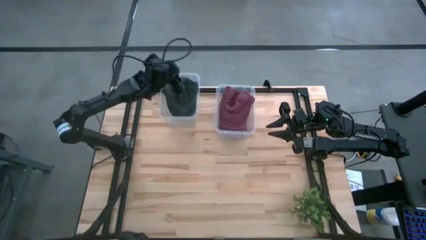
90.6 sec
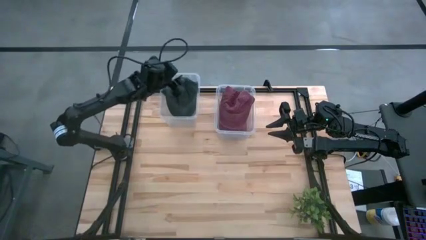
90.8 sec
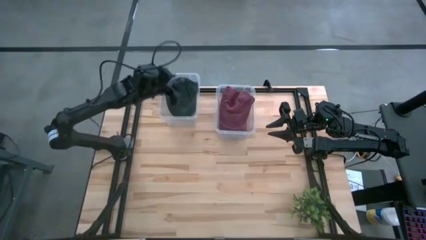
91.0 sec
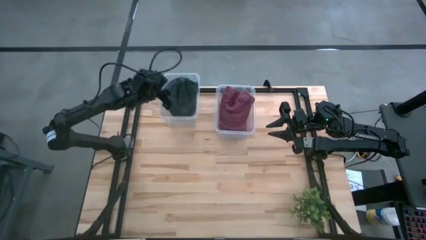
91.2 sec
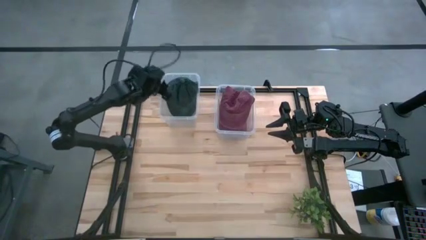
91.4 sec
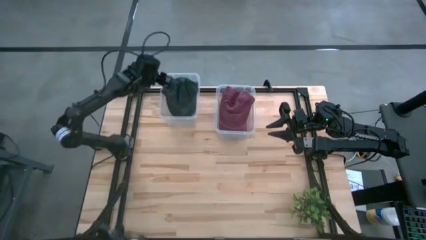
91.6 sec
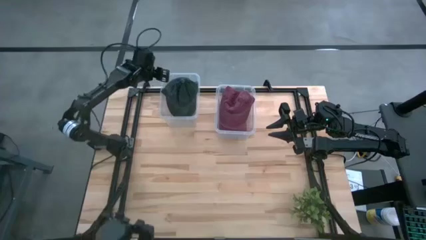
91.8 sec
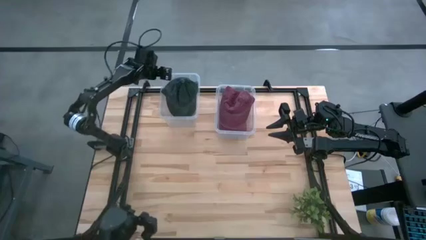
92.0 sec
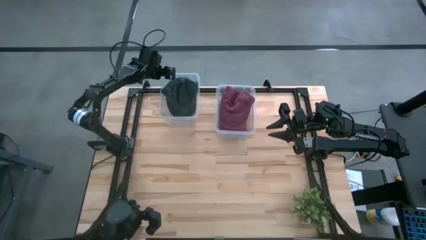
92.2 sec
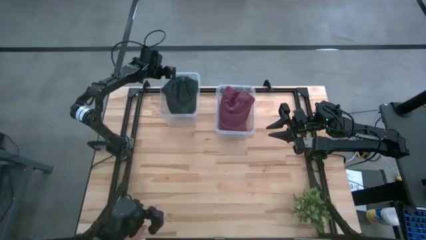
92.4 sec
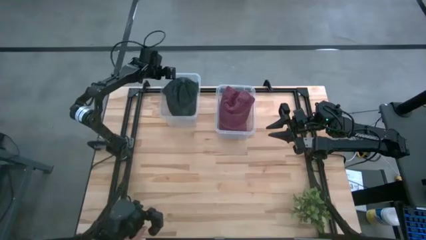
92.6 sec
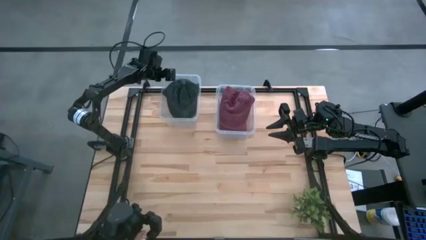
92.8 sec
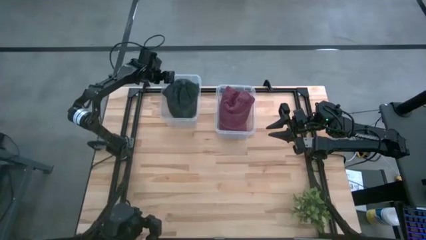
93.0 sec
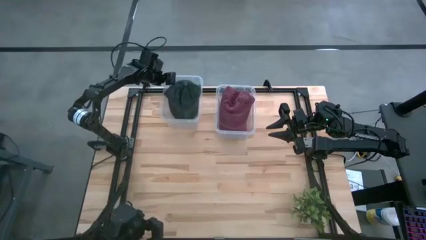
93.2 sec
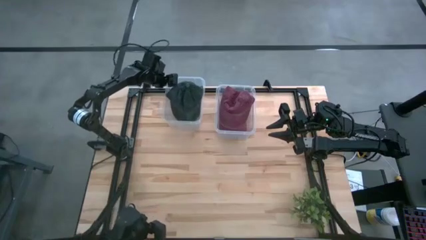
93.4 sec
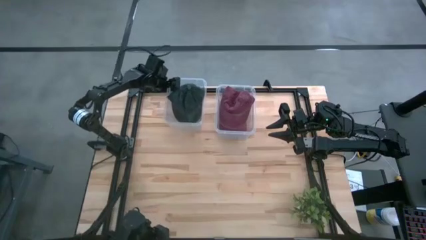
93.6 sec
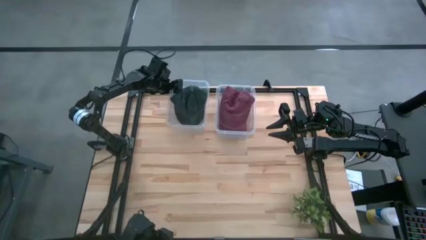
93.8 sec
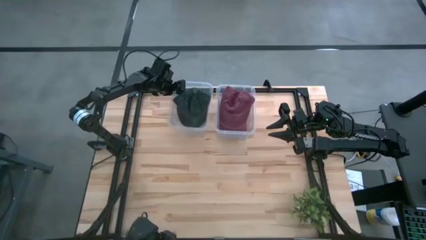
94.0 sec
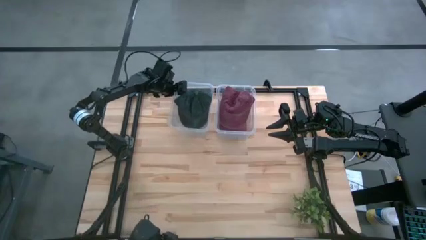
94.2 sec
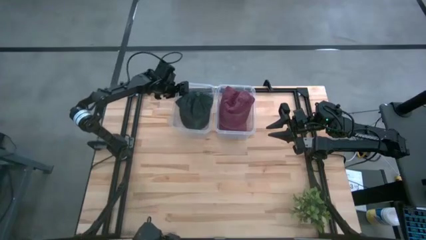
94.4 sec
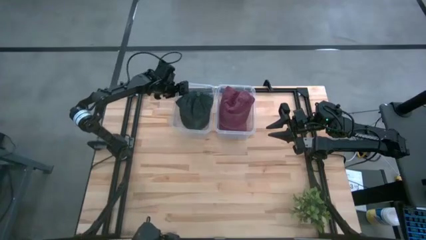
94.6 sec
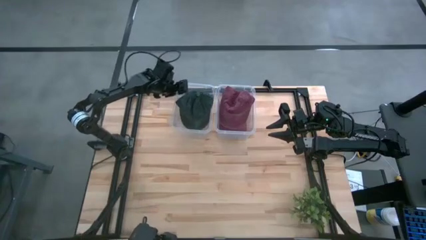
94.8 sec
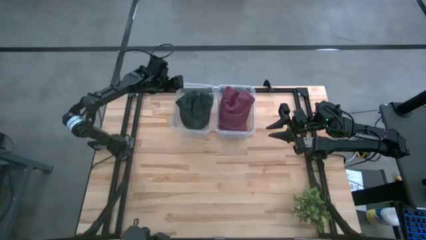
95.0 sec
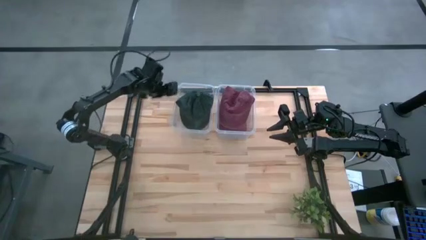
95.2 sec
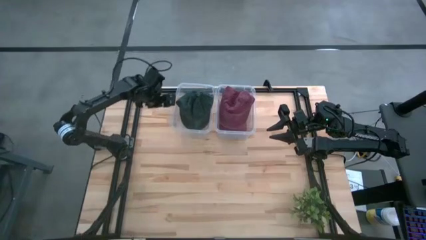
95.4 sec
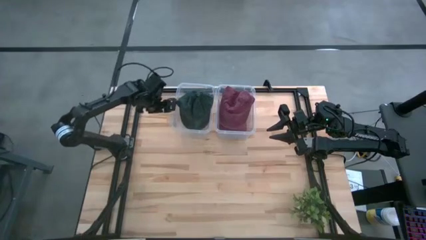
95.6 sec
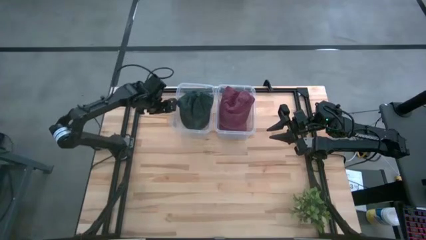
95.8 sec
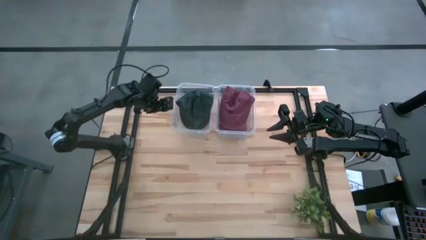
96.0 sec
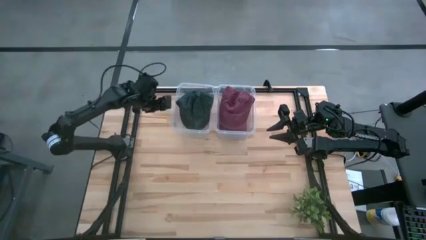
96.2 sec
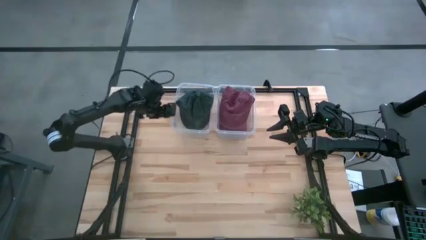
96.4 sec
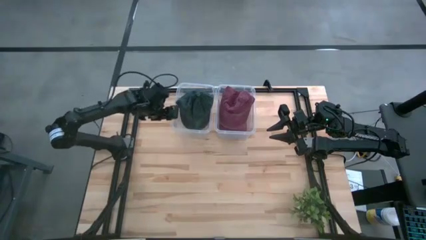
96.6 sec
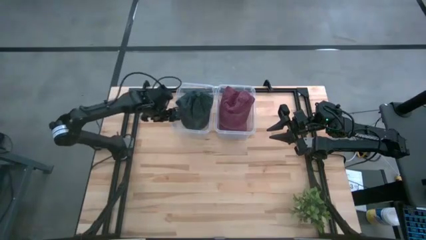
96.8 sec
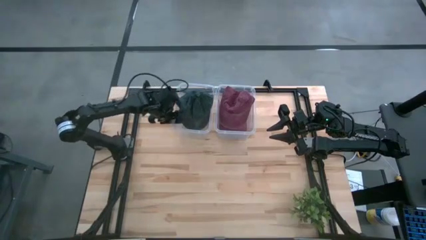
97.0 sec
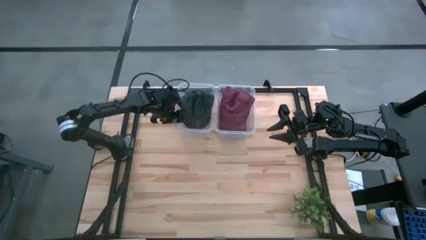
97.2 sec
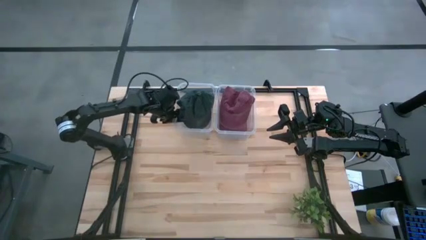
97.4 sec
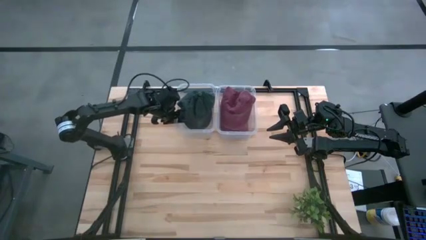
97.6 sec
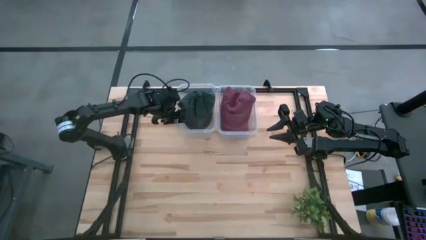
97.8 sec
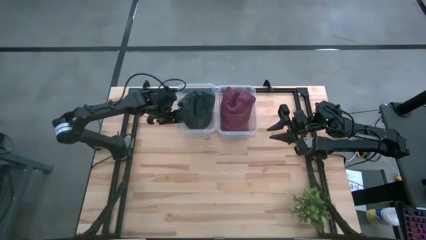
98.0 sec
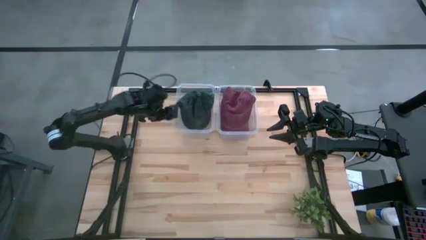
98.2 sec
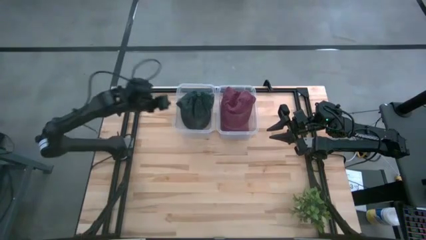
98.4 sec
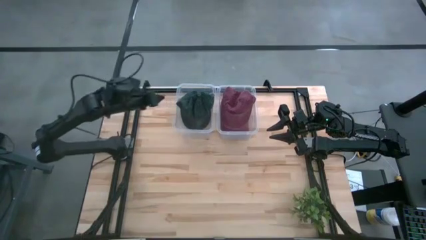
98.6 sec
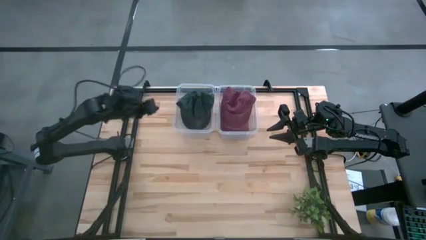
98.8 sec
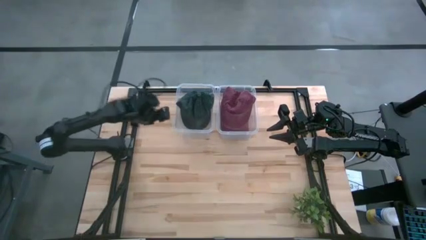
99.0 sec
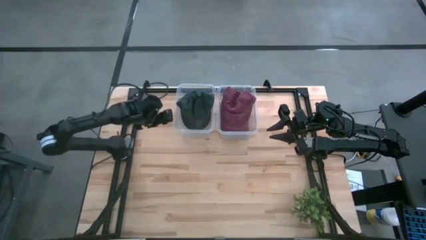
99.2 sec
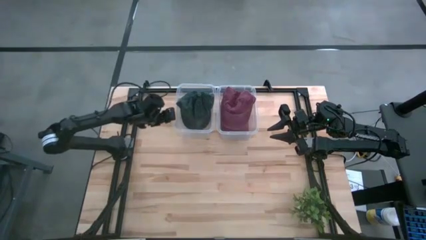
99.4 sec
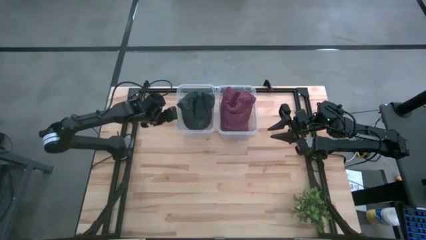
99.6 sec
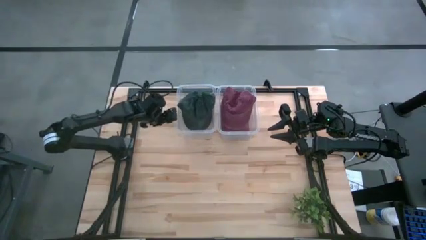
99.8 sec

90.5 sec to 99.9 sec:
Task: Pick & Place hat
Adjust the left transparent bin

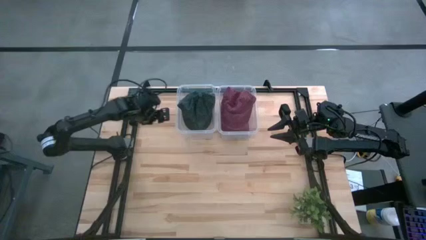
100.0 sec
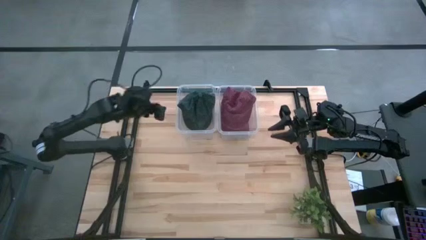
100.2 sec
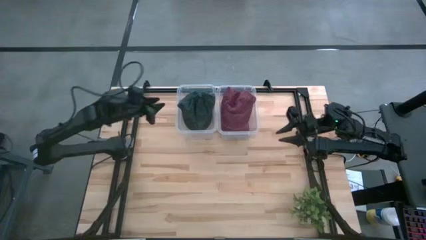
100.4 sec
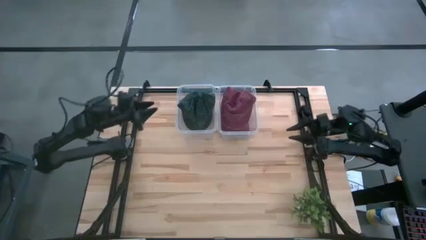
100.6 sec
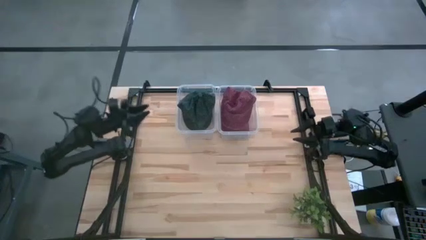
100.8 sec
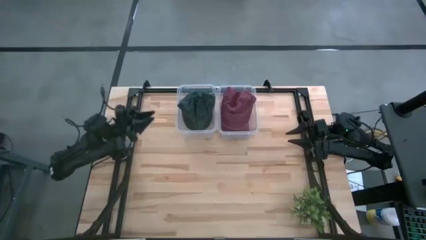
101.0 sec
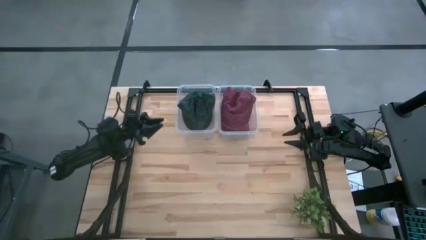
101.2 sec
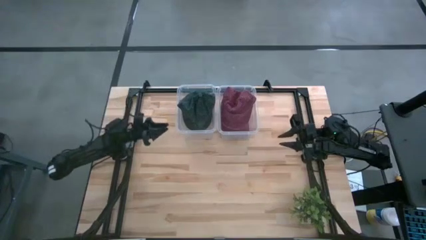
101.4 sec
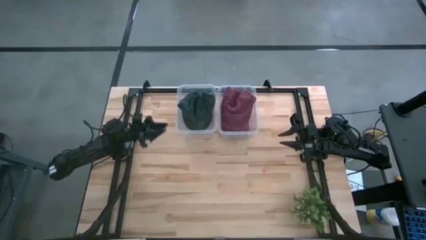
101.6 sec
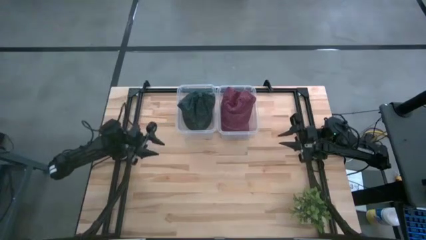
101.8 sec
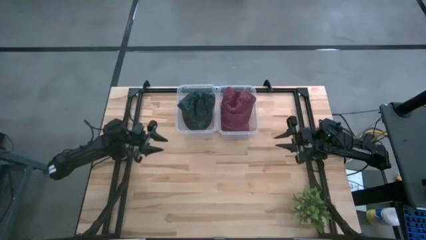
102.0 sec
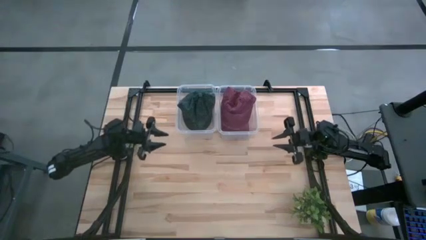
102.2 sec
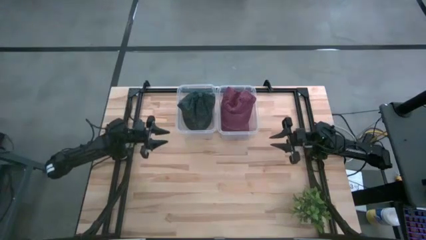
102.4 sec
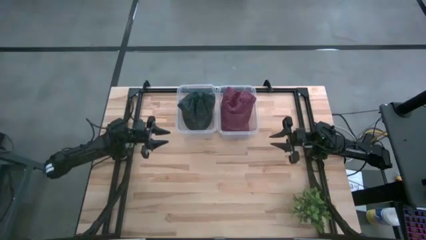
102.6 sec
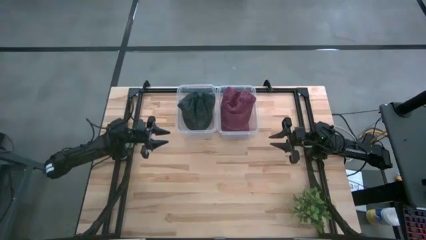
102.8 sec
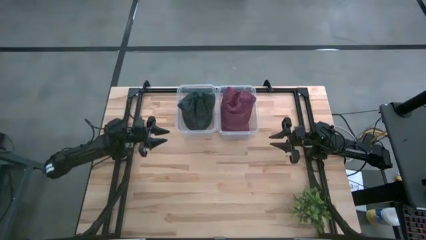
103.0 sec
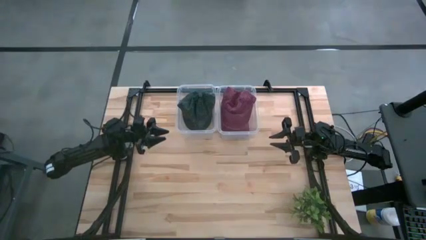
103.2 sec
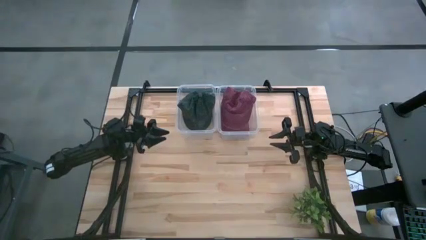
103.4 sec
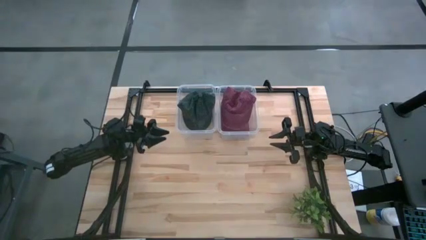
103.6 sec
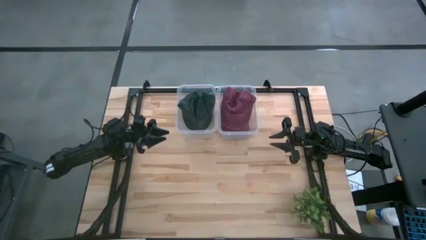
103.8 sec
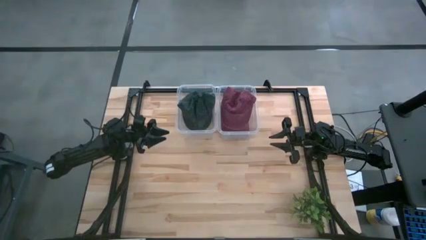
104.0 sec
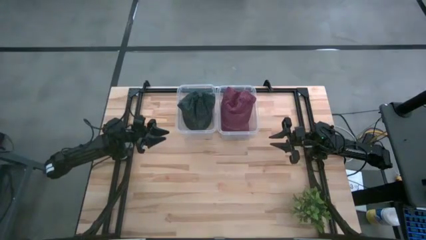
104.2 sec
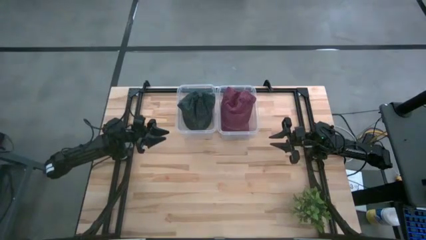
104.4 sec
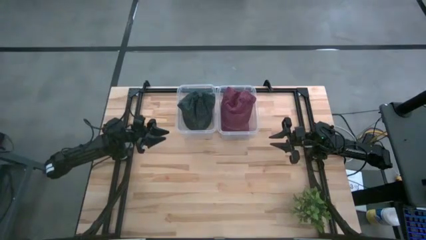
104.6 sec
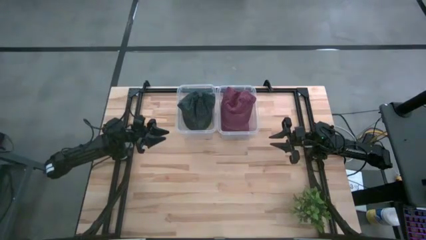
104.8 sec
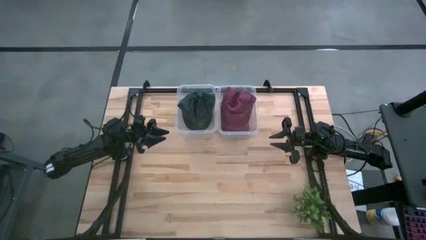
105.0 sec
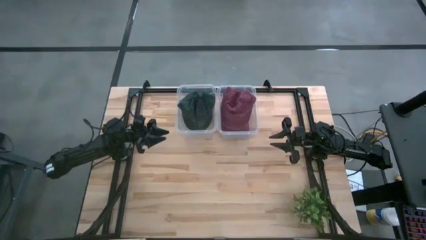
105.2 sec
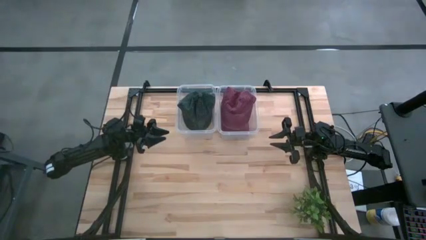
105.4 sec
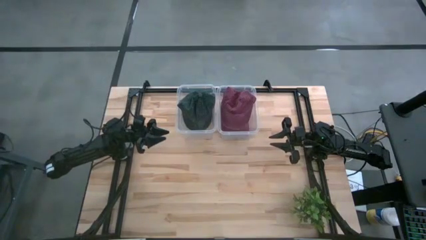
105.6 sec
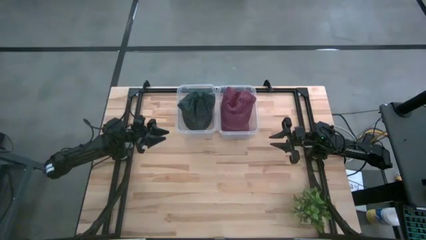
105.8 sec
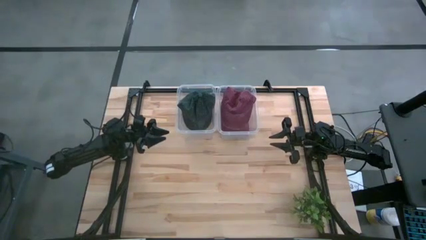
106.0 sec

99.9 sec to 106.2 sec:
Return to Home Position
